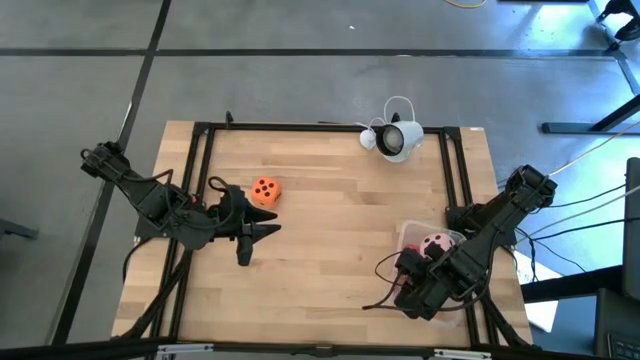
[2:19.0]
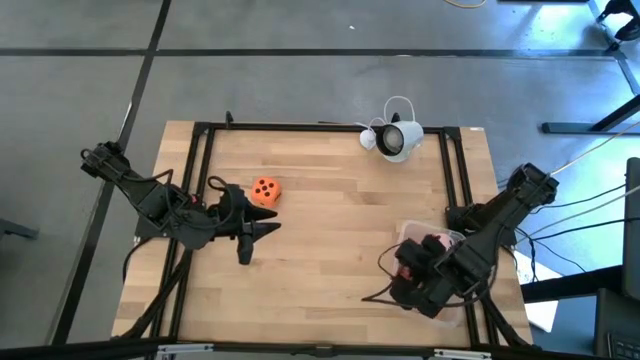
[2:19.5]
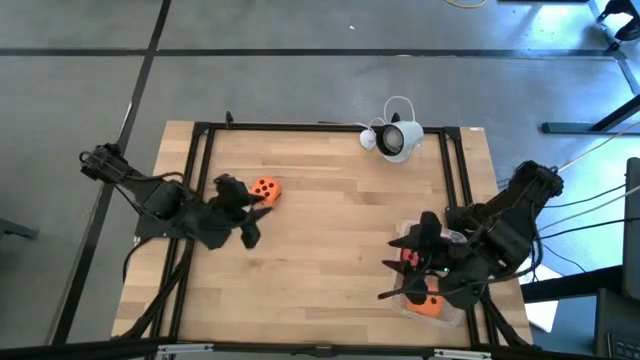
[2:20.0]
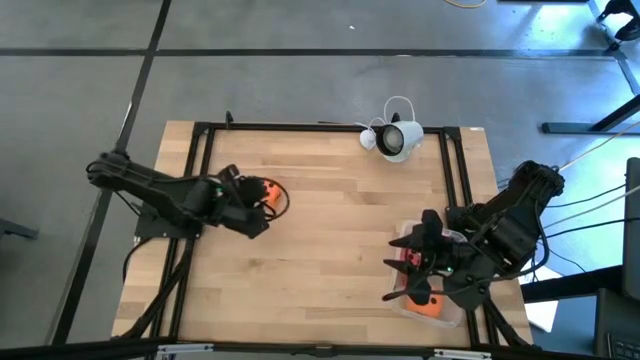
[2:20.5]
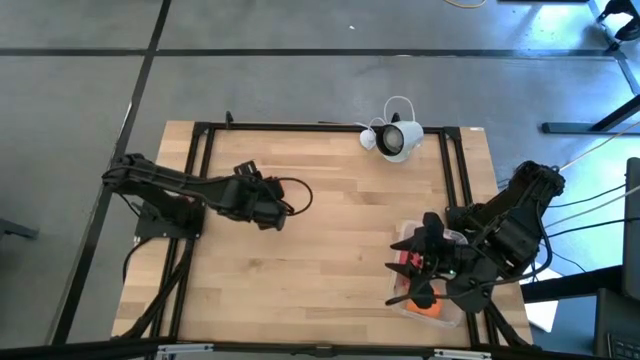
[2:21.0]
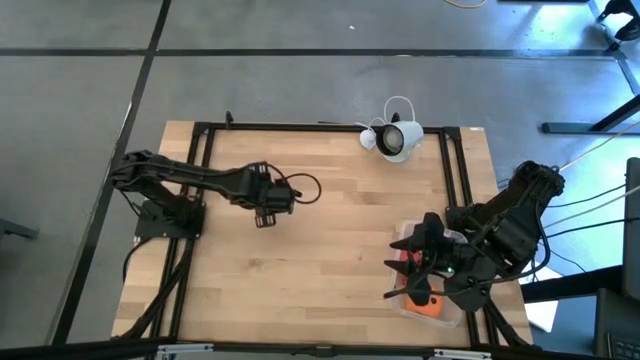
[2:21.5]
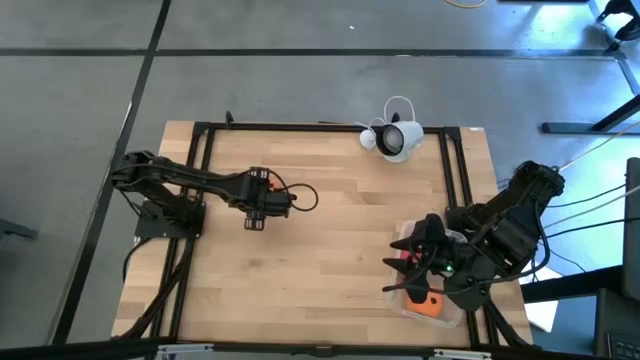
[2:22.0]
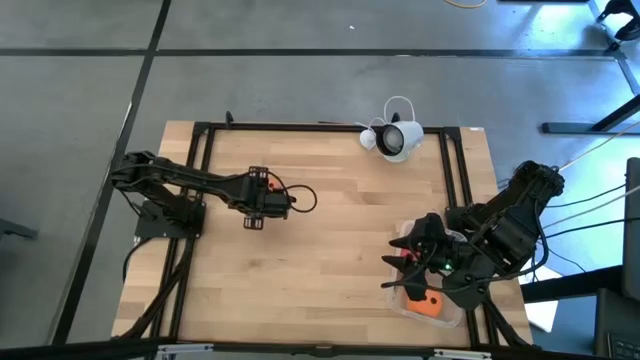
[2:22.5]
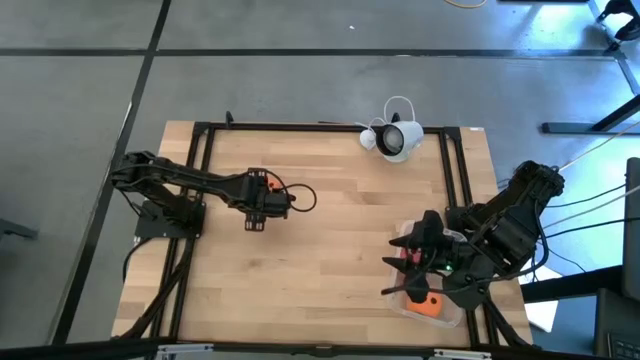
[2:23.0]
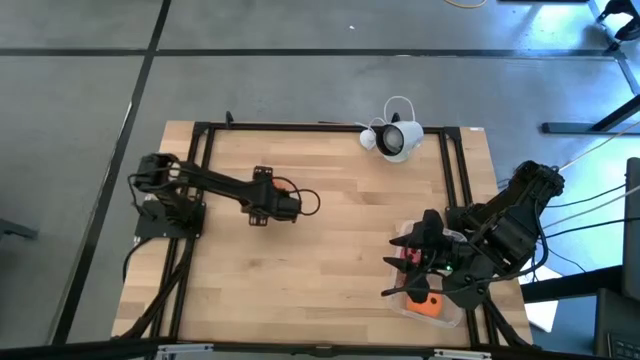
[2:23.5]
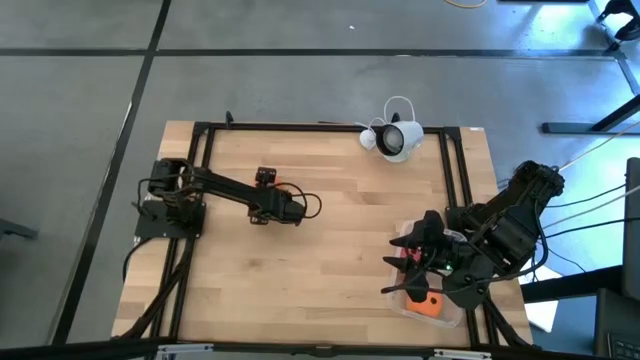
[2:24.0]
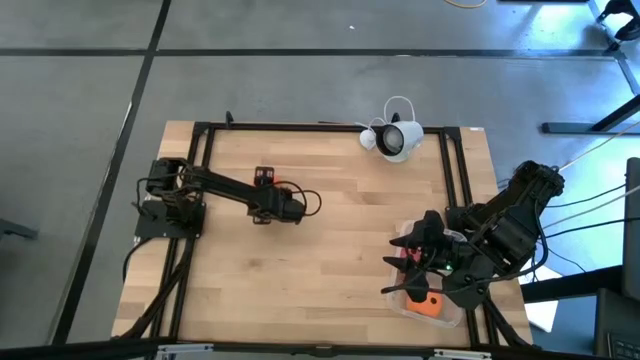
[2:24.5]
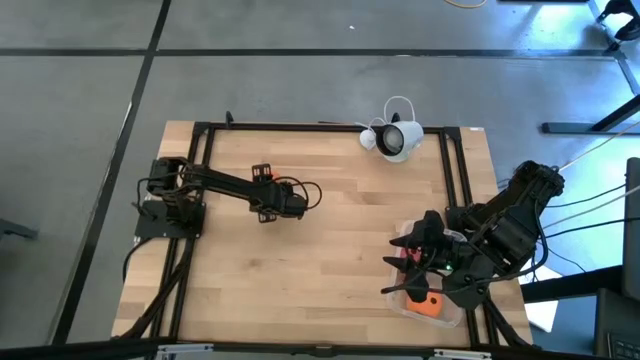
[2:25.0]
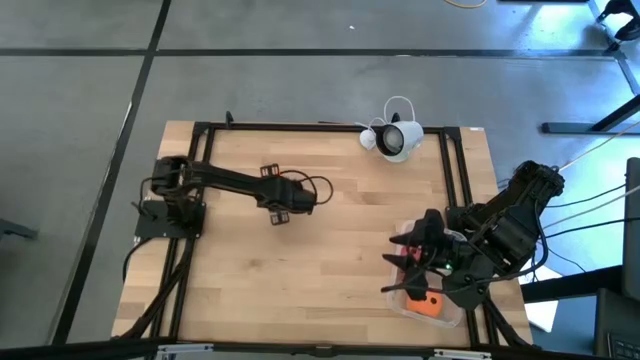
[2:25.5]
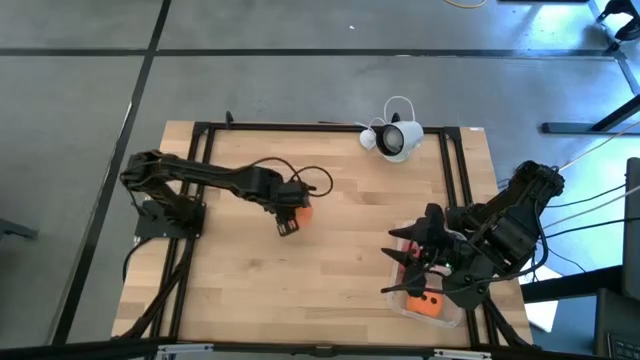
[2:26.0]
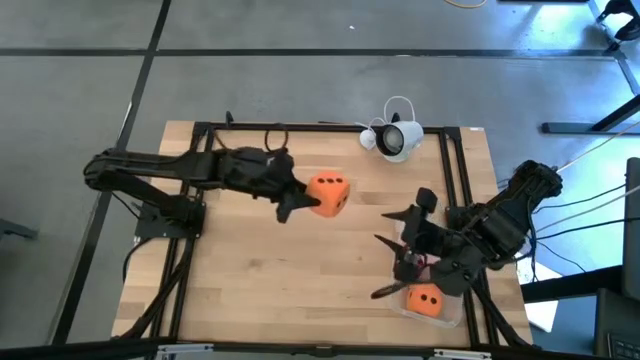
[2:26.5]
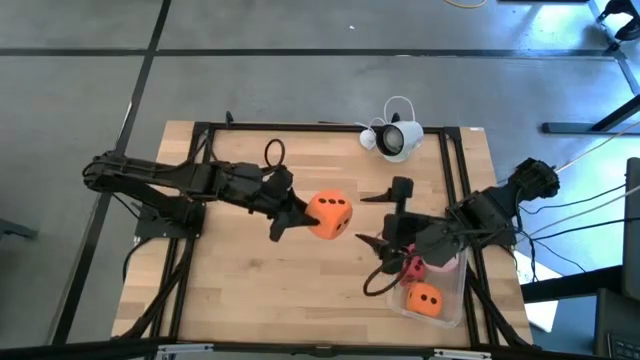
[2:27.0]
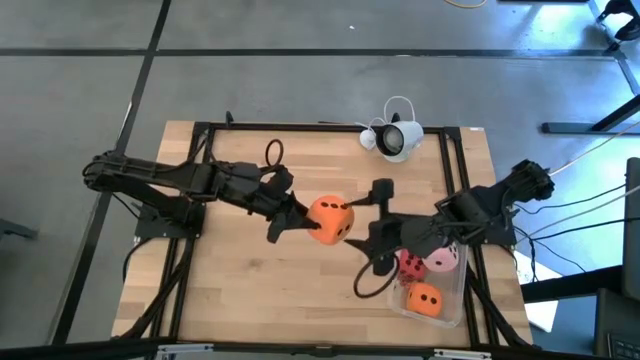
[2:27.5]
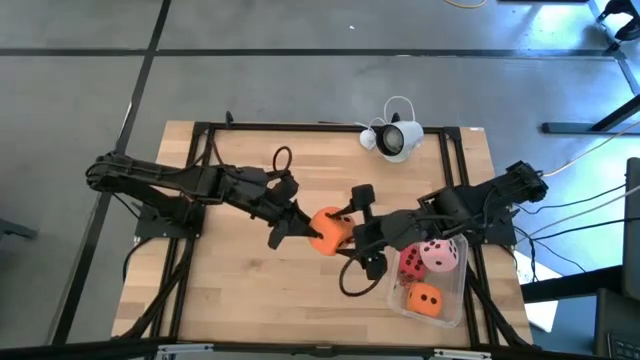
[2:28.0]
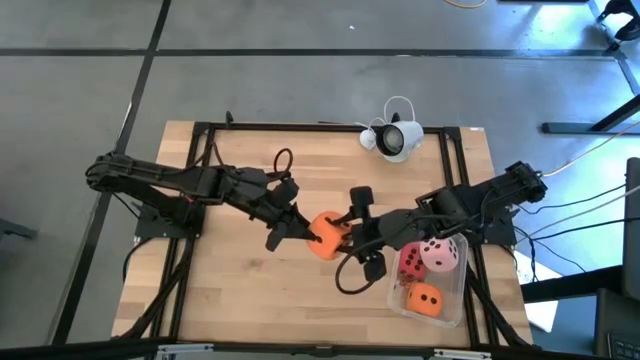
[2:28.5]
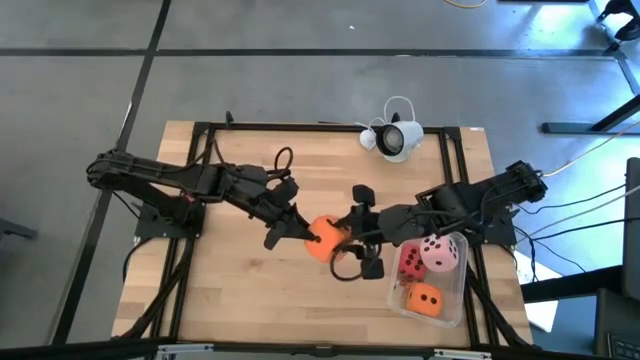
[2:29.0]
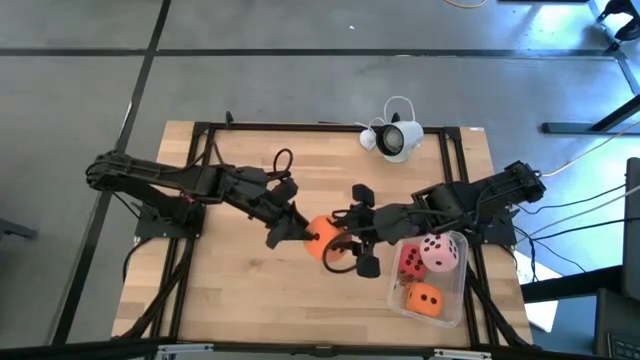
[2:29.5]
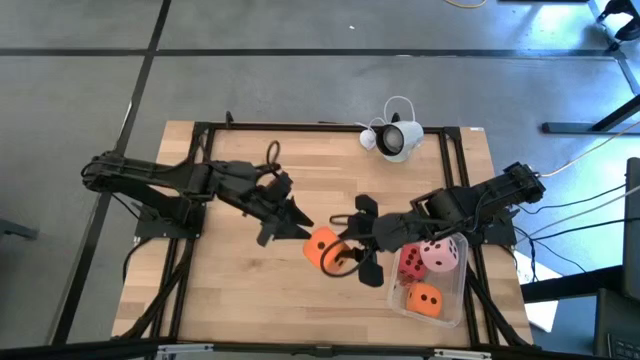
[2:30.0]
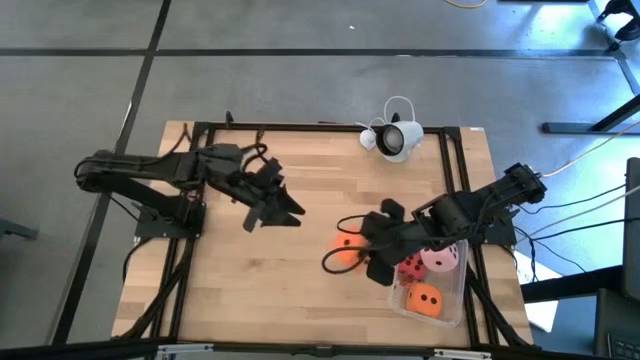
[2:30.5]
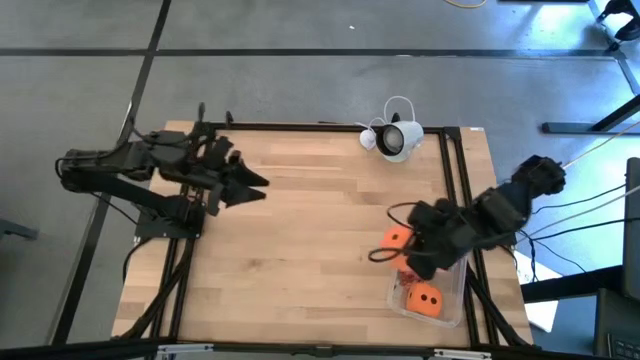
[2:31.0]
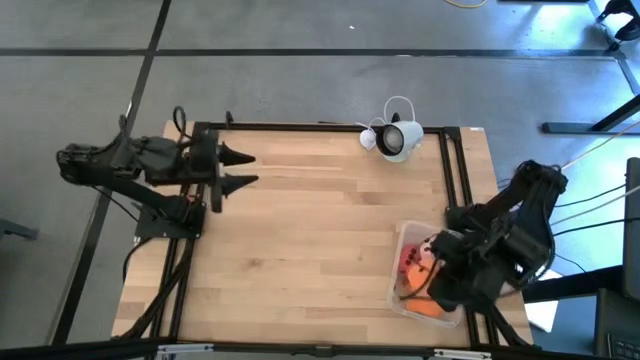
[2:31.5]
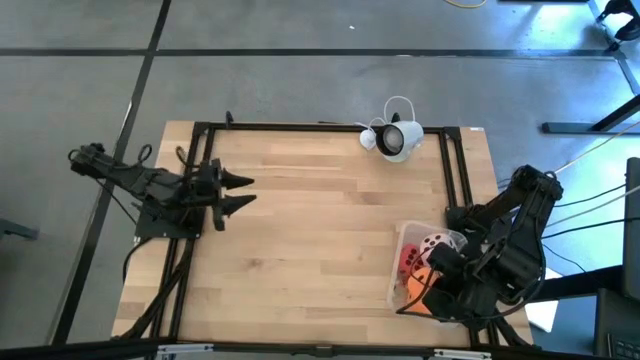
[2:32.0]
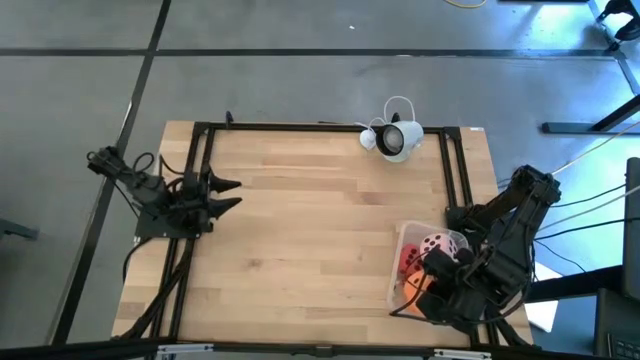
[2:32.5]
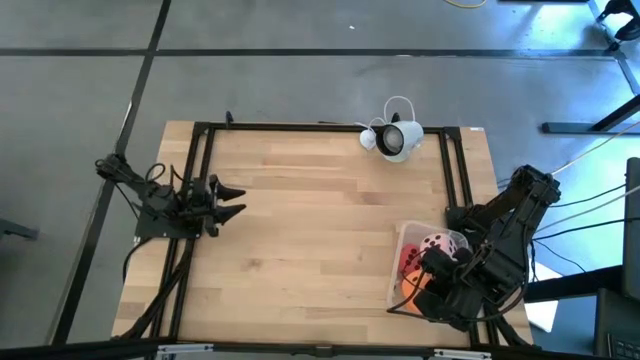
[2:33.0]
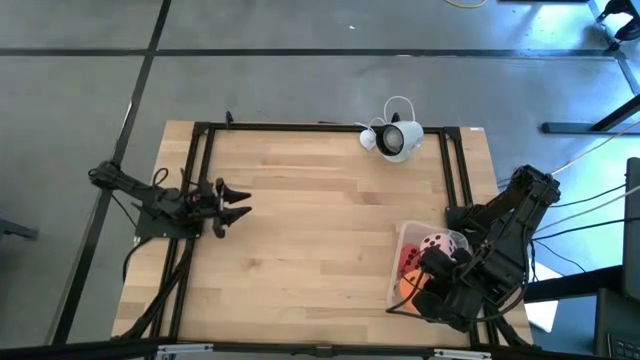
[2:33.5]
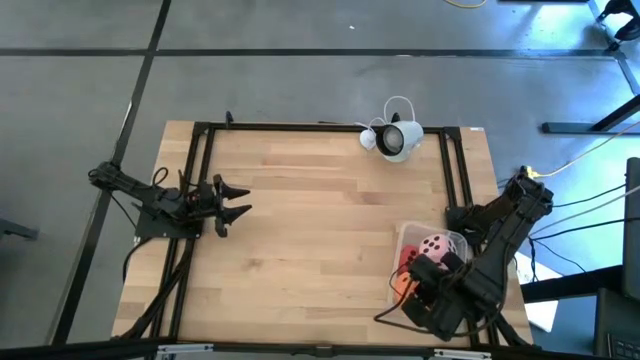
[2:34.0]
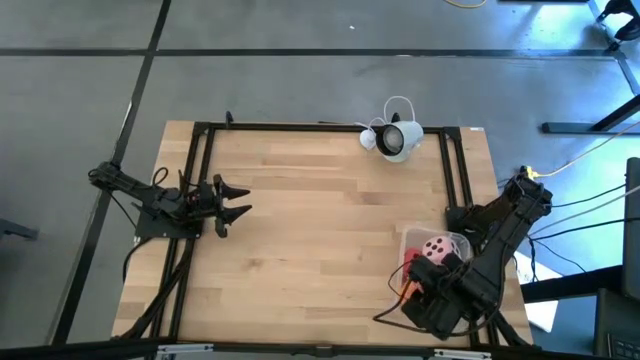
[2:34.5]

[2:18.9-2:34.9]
Task: Pick & Place Dice
Put the large orange die into the transparent bin

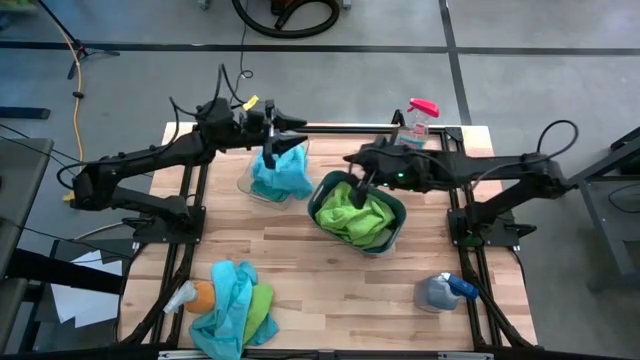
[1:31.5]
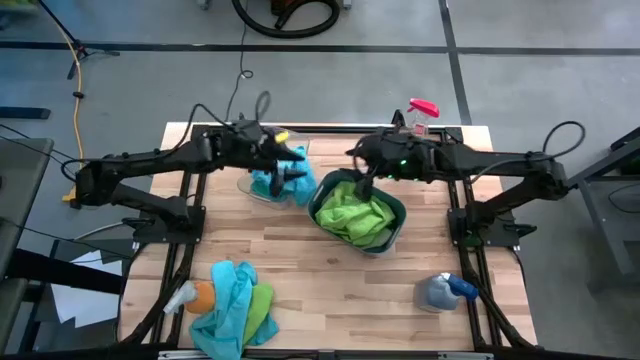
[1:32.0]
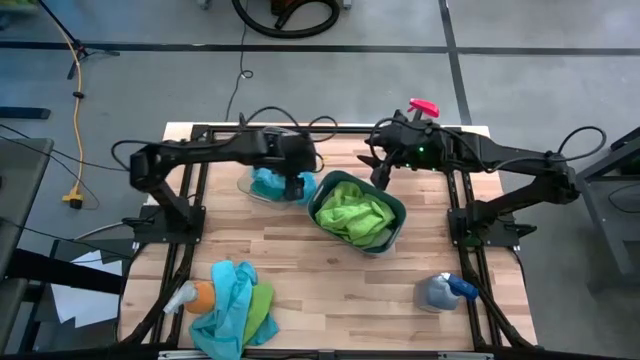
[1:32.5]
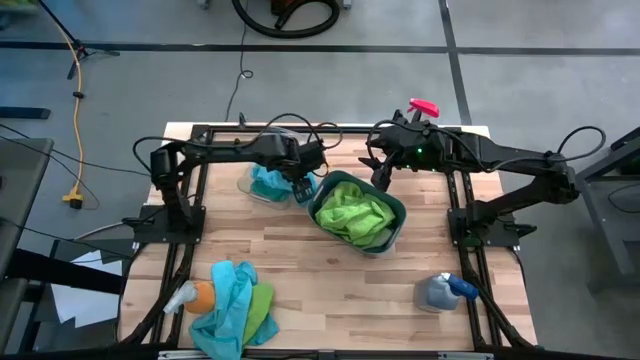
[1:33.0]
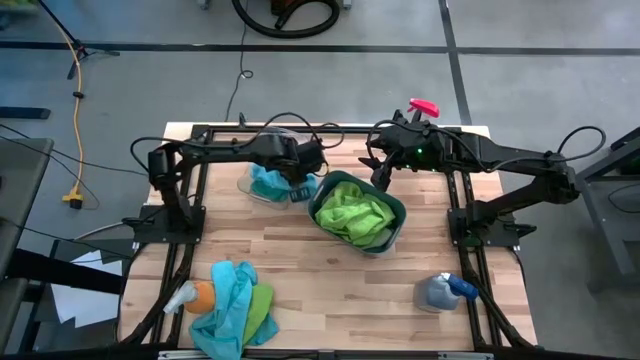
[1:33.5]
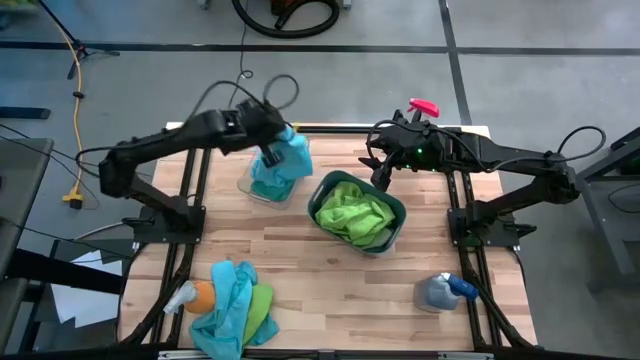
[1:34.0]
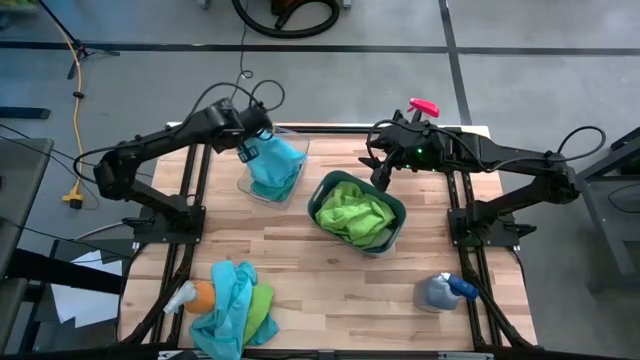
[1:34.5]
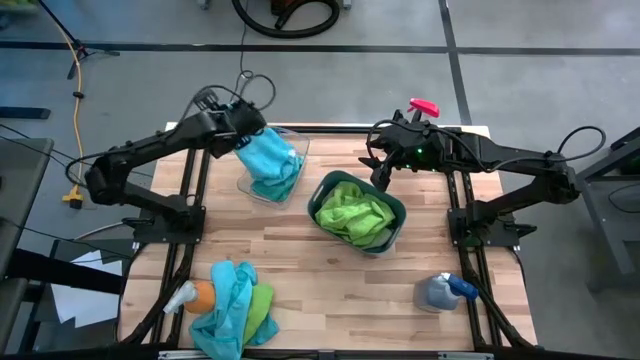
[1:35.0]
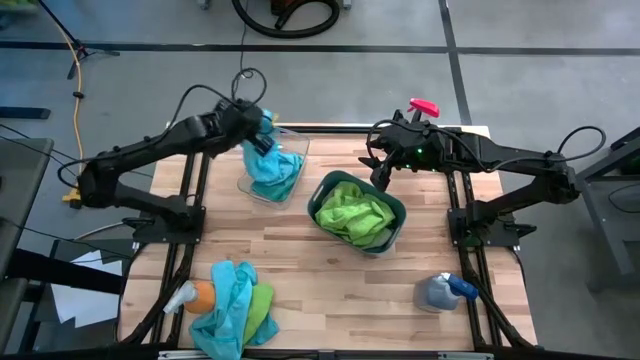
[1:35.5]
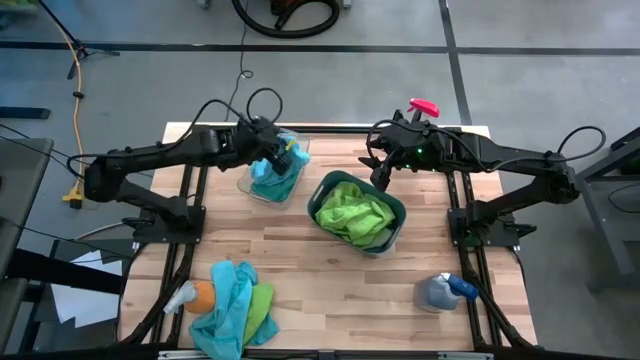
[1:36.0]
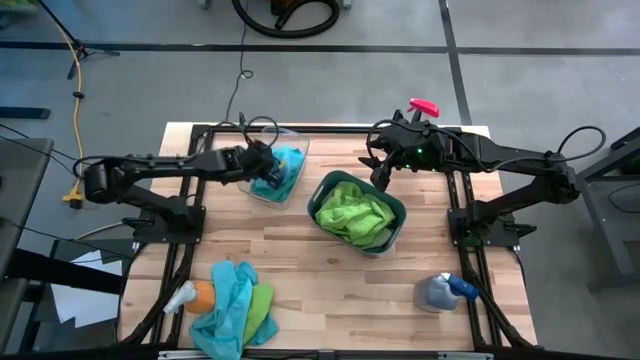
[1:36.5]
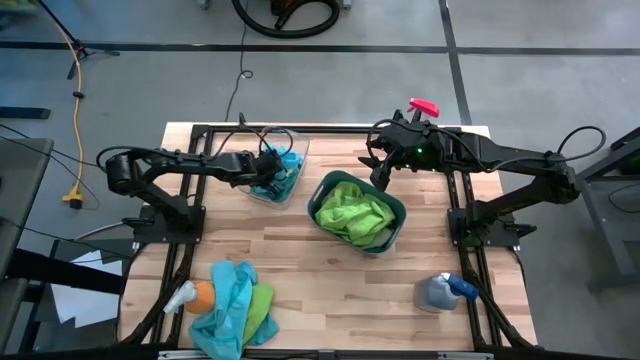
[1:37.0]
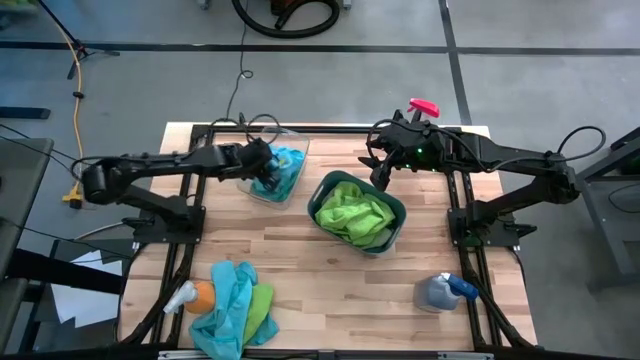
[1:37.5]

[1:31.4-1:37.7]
Task: Sort microfiber towel by color & place in baskets
Put the blue microfiber towel into the transparent bin
